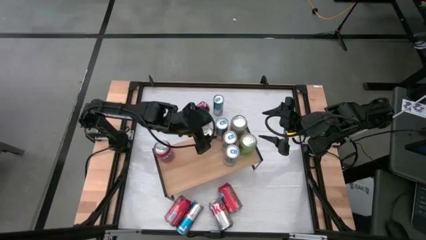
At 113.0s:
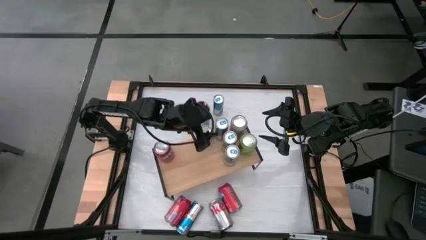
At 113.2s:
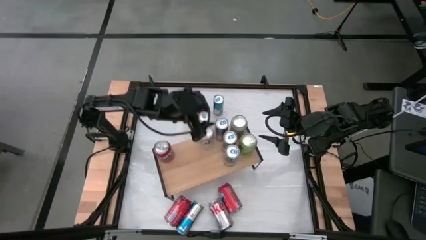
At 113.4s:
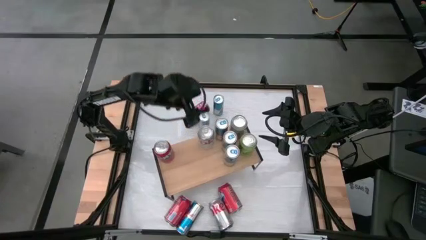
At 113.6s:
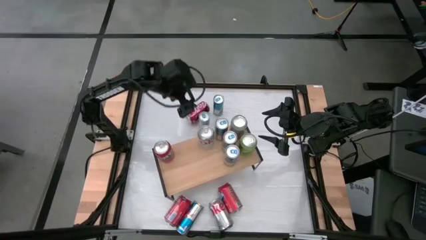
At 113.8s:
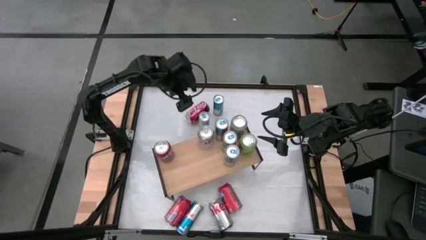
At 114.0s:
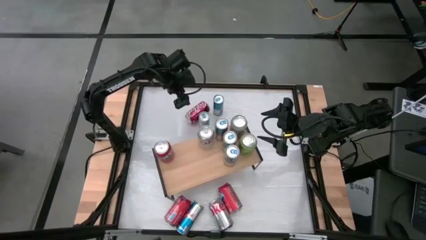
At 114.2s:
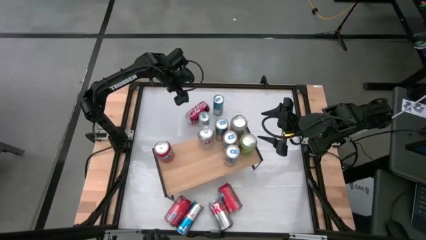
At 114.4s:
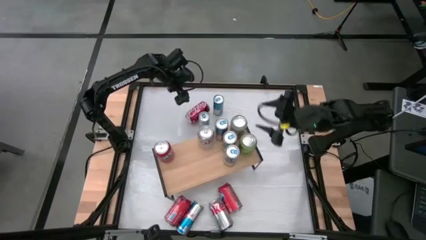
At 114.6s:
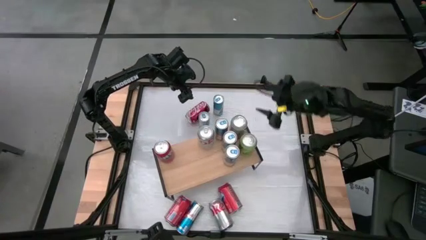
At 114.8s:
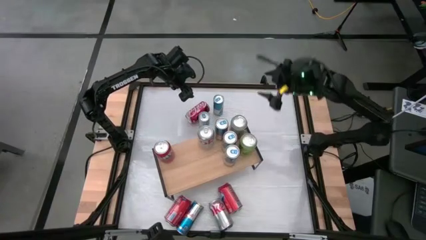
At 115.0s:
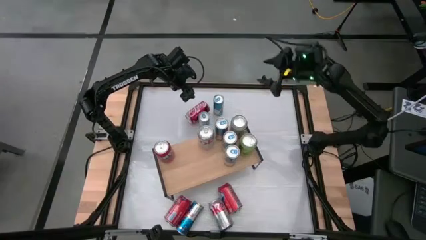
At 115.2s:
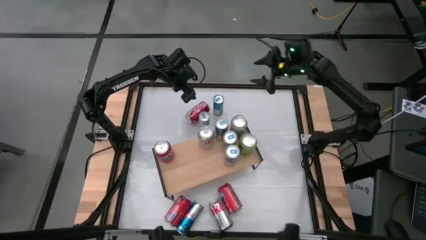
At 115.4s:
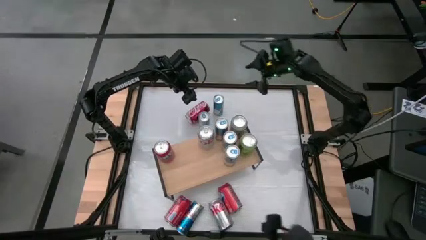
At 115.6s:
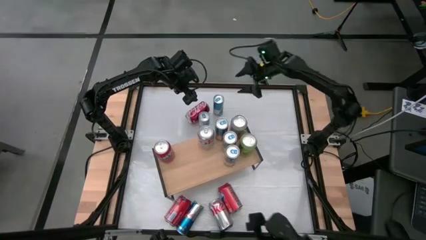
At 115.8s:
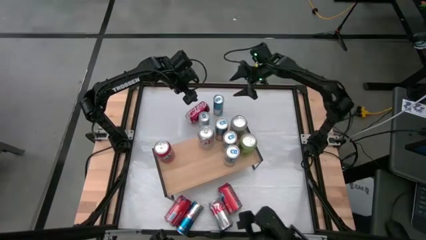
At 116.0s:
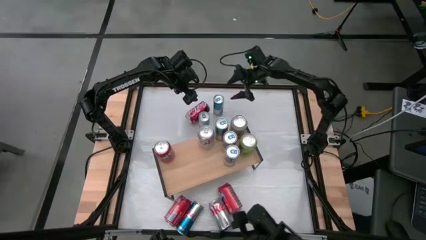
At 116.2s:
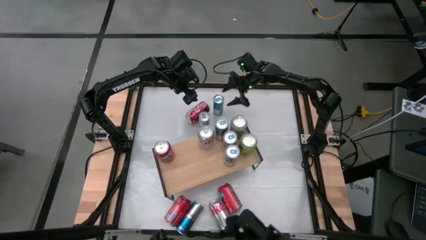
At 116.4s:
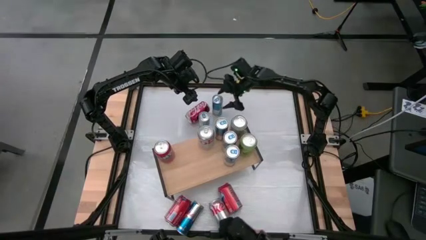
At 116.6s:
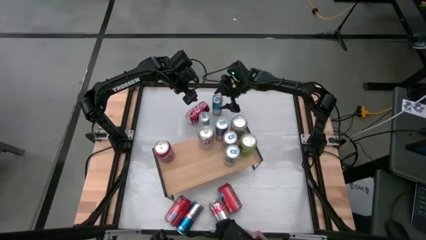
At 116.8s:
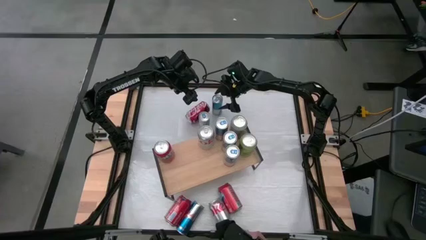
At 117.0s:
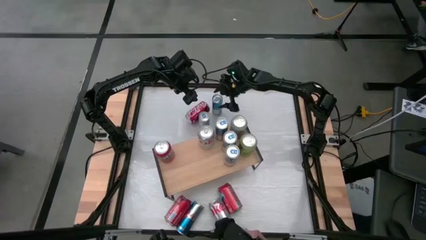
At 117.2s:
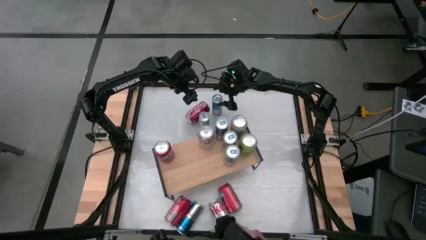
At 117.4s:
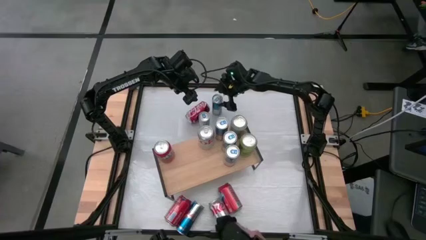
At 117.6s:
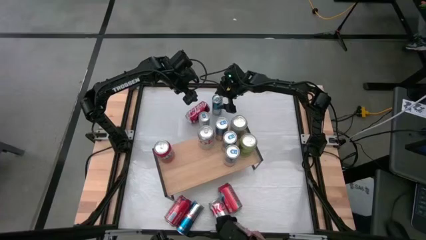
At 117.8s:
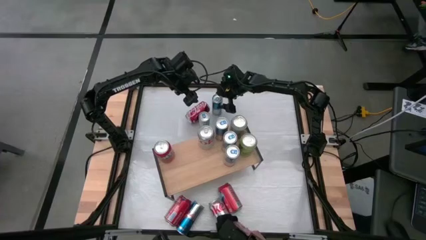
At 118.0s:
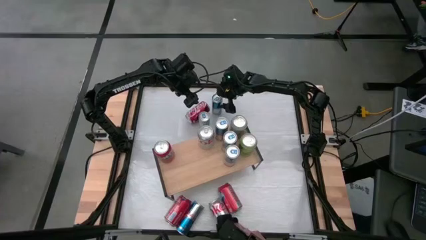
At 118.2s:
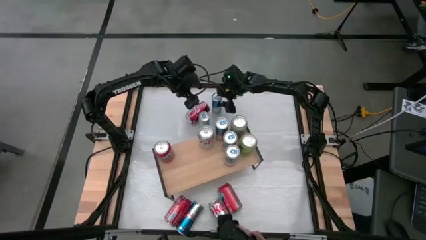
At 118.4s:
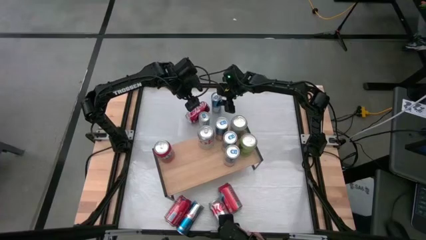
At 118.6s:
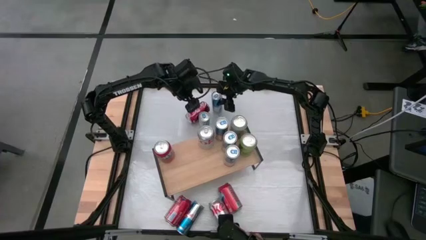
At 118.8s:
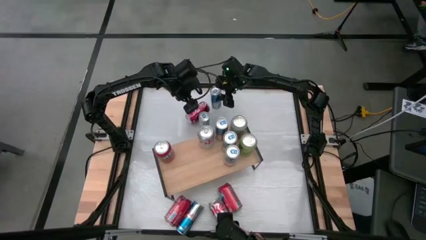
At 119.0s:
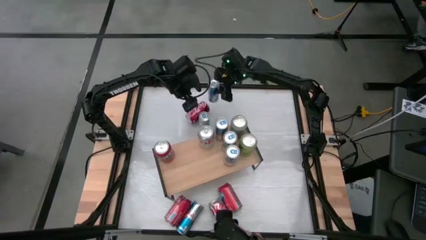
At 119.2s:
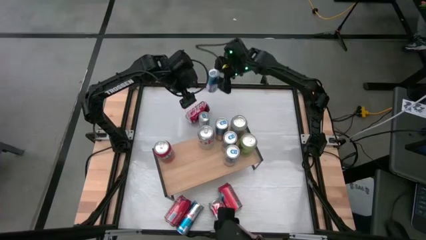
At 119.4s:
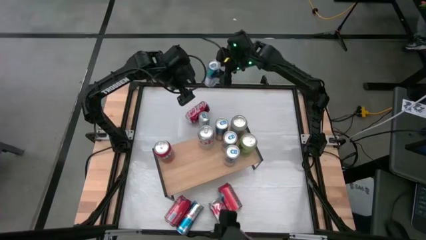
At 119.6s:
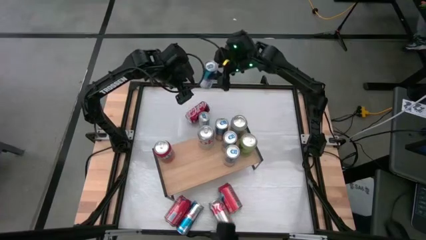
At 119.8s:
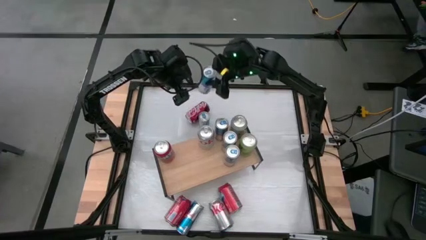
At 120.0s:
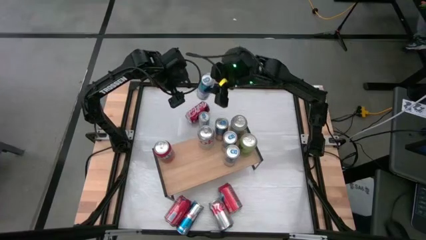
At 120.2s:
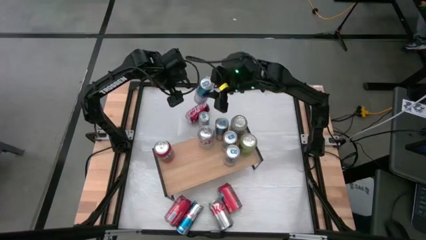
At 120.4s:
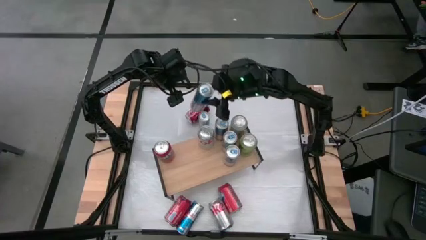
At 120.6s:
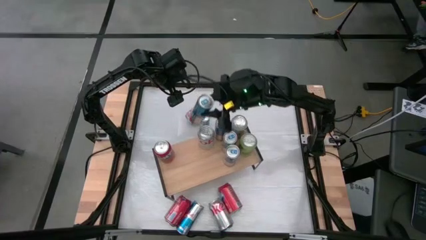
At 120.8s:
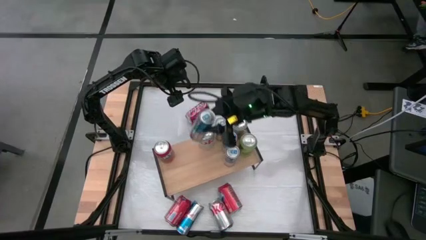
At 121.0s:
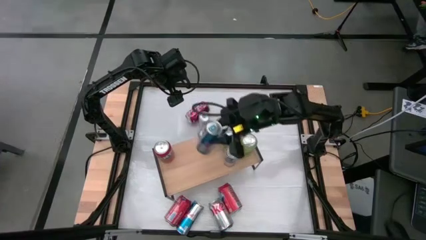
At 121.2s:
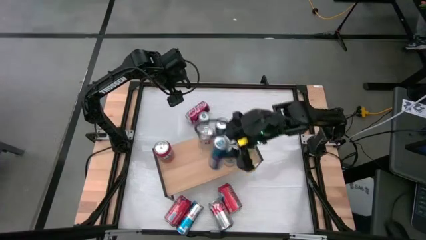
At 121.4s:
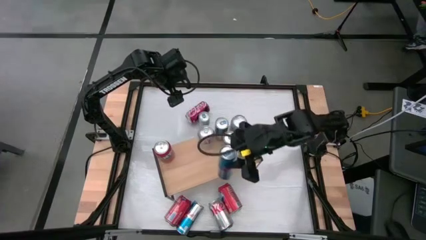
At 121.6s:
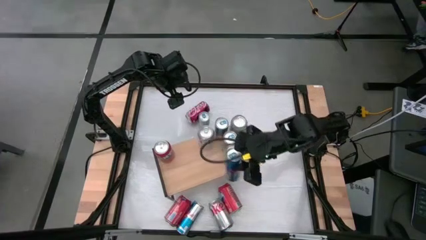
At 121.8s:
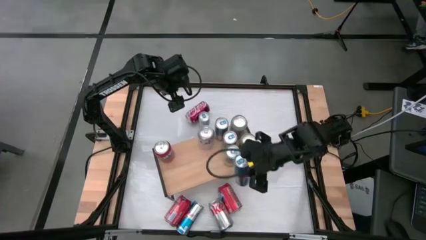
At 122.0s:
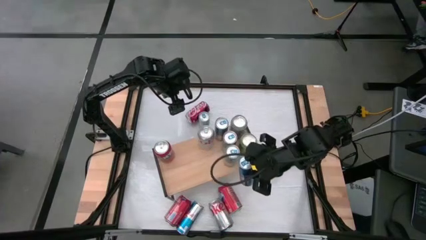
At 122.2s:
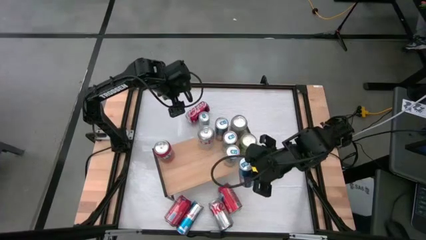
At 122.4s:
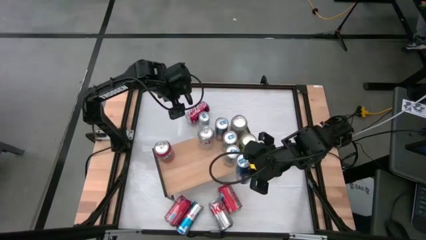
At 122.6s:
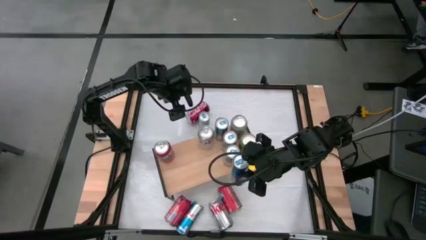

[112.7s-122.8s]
Task: Place canned beverage on shelf
Put the blue soda can on the shelf

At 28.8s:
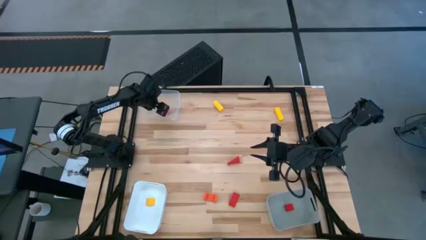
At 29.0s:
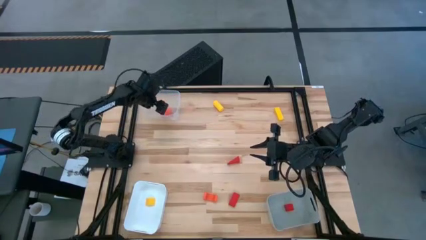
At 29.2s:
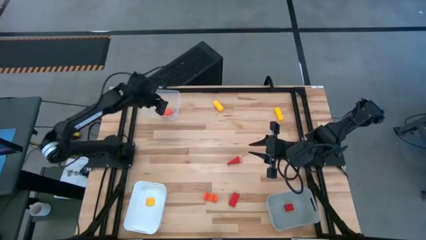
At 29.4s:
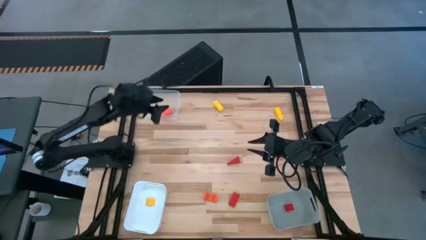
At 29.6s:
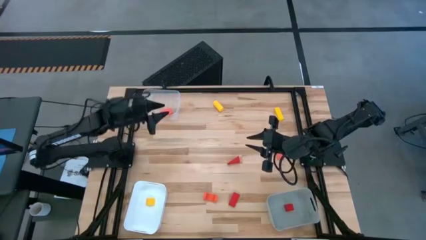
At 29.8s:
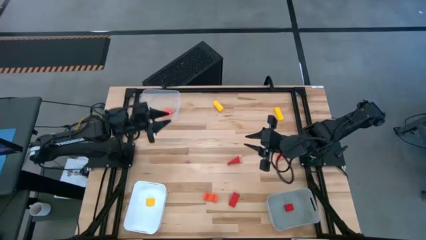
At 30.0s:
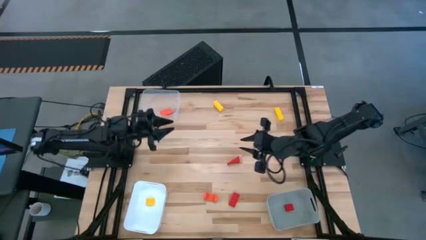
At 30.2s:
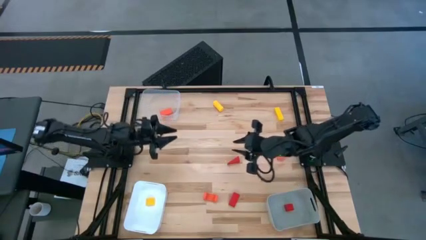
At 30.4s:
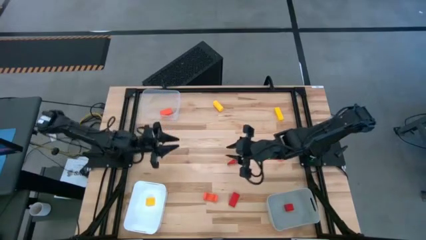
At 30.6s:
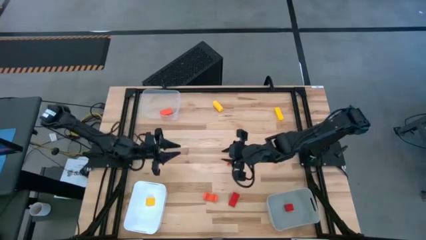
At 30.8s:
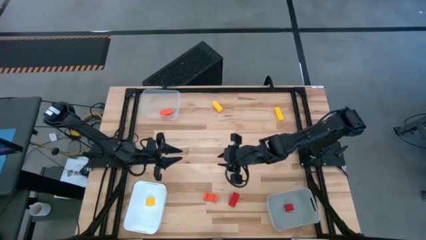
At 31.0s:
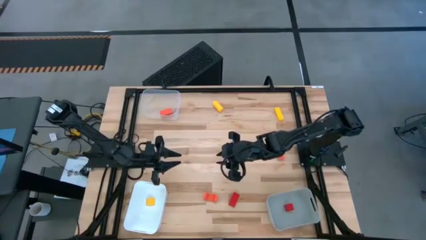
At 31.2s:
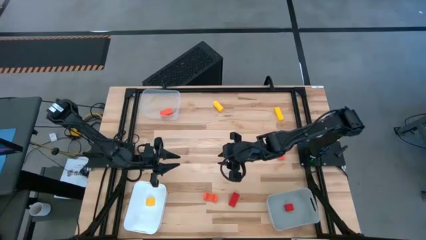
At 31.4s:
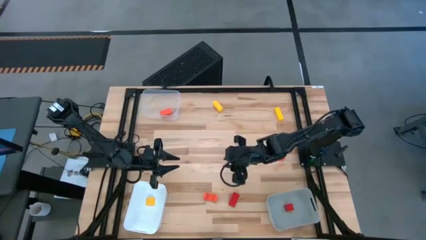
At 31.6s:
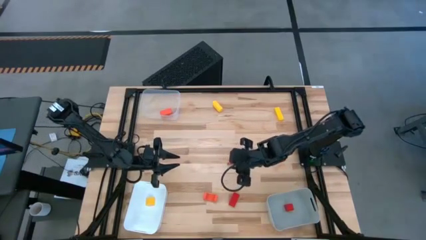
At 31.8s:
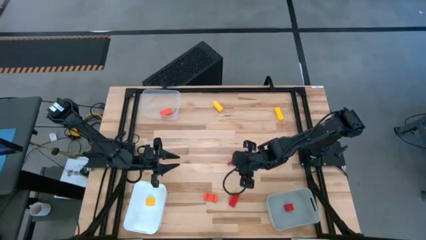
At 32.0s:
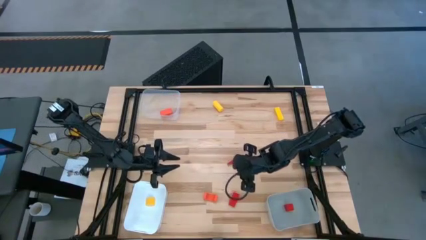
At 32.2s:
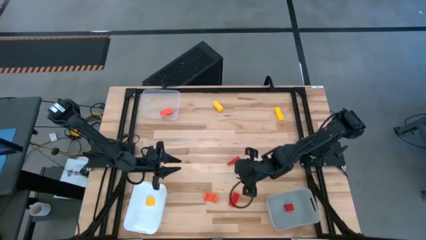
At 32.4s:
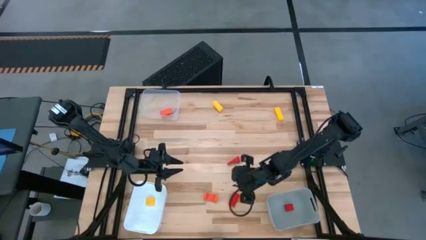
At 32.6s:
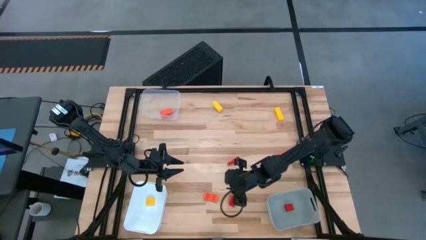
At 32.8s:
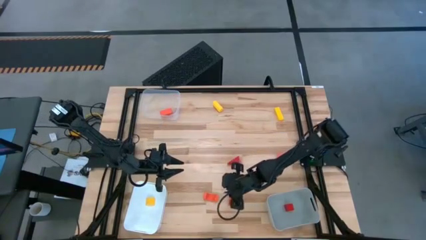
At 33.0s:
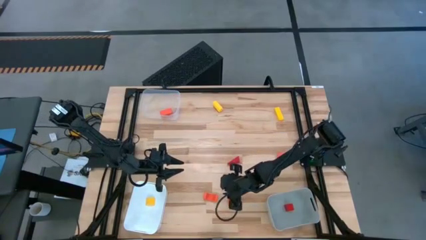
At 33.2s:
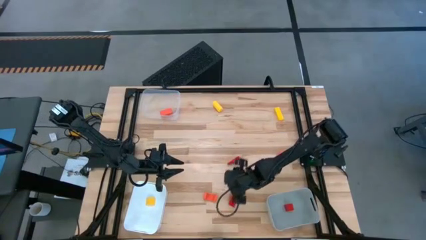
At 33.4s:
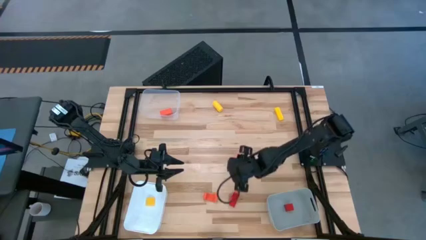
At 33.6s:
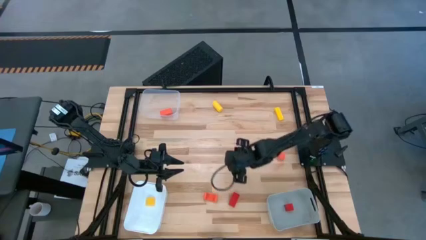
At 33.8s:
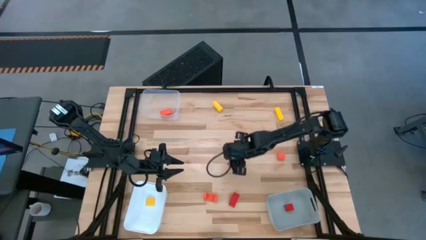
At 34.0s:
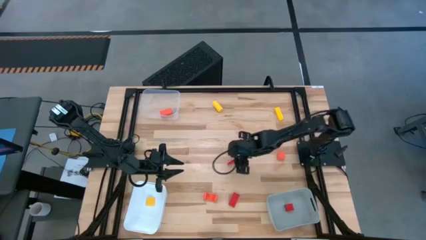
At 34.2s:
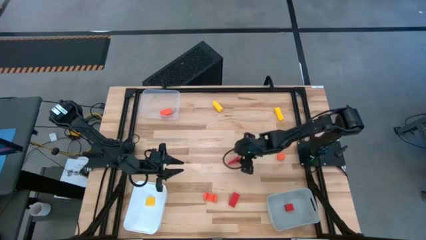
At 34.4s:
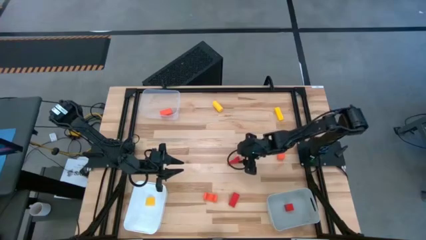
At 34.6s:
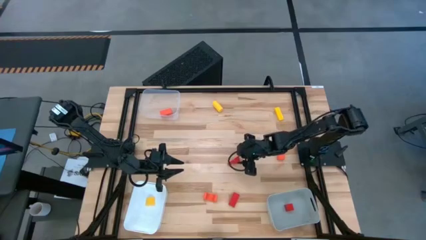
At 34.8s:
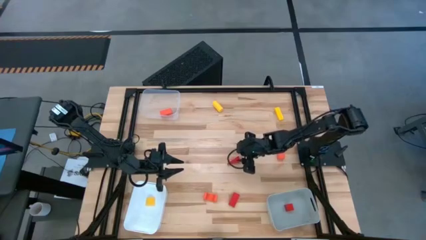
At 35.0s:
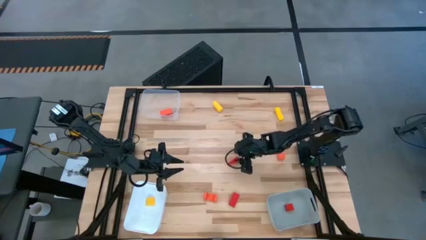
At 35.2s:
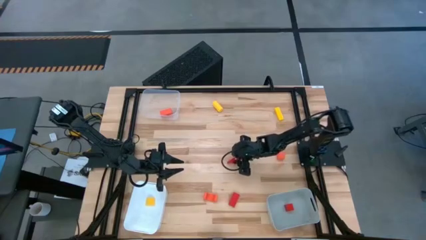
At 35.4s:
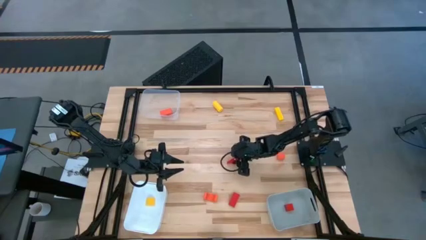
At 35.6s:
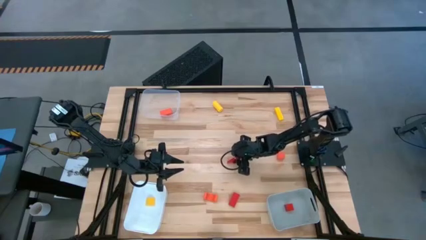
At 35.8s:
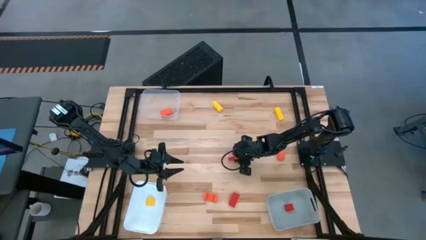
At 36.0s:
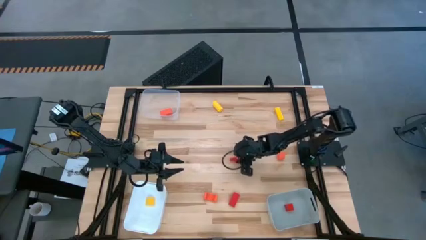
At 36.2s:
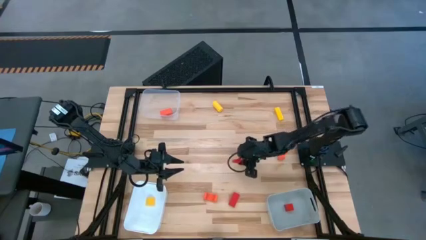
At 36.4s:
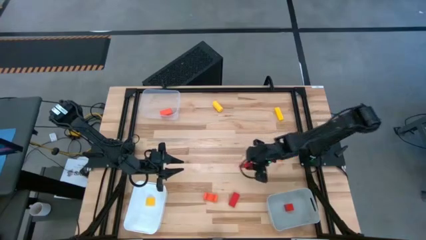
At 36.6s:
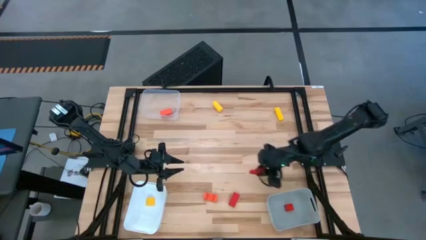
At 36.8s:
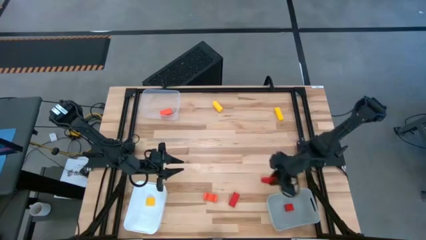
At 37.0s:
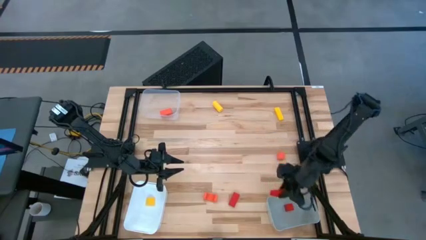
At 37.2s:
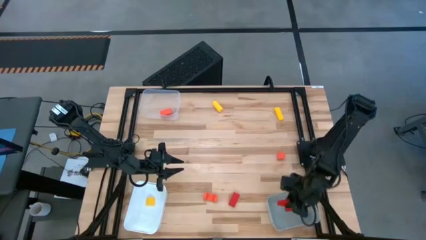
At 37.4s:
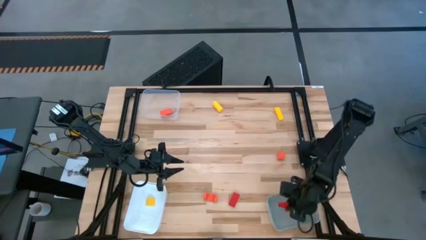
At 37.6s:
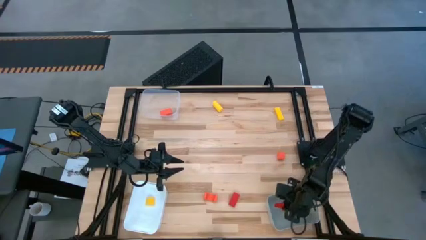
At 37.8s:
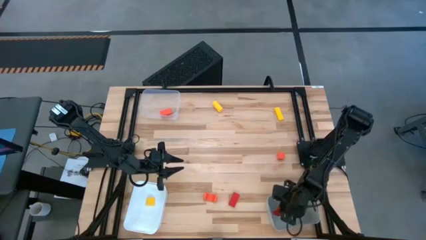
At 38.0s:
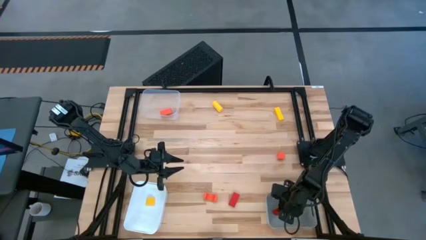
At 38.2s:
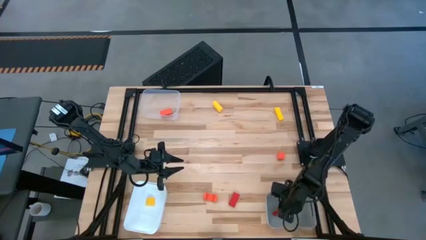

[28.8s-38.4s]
Task: Sort & place blocks by color
Put the top red block into the gray bin
